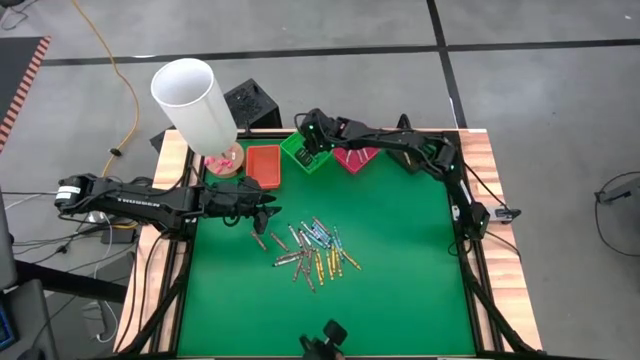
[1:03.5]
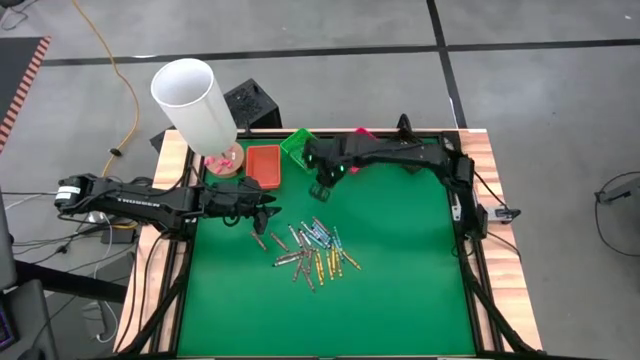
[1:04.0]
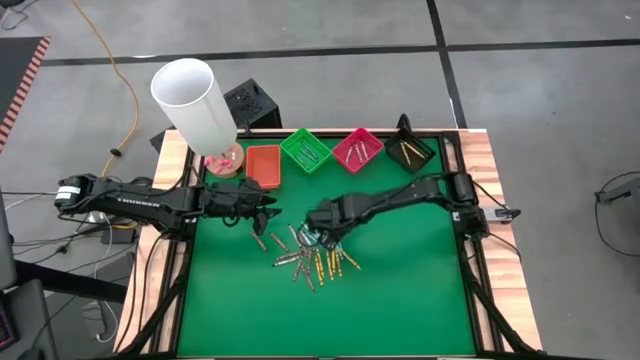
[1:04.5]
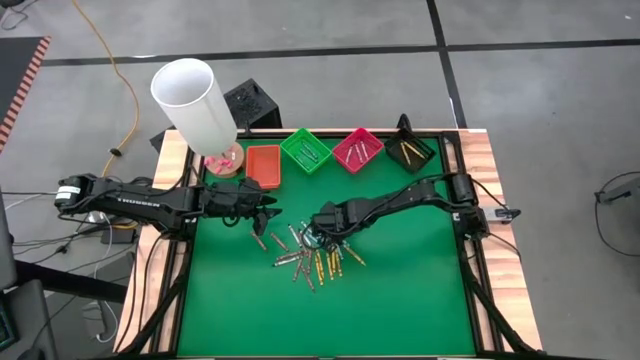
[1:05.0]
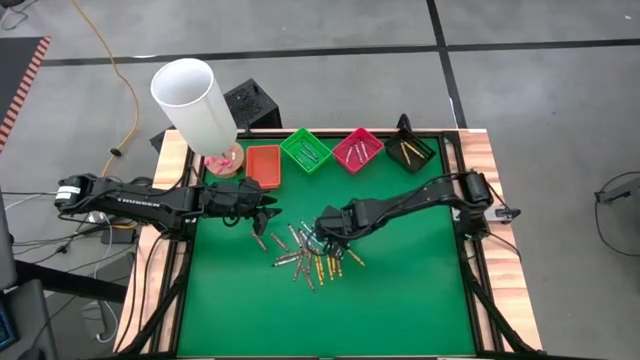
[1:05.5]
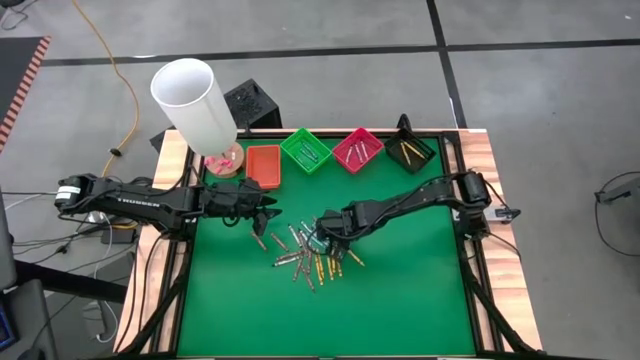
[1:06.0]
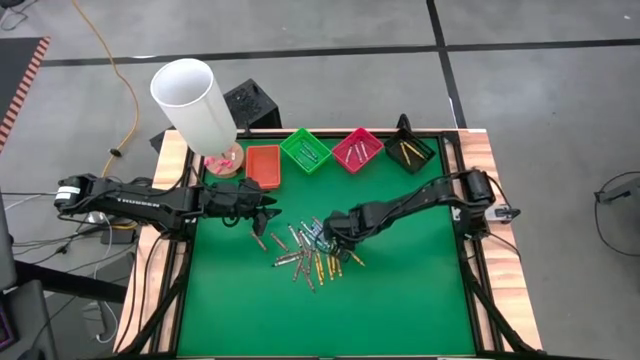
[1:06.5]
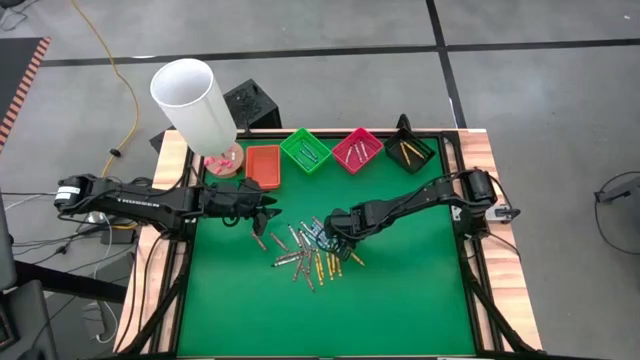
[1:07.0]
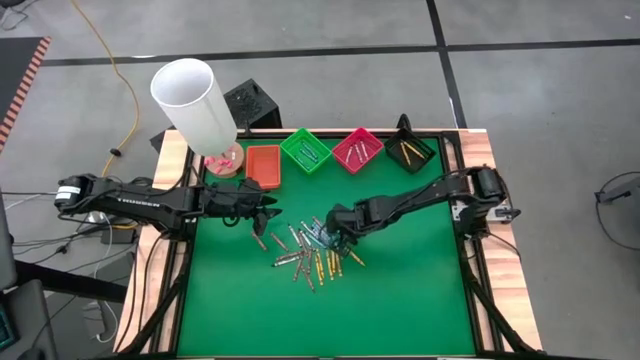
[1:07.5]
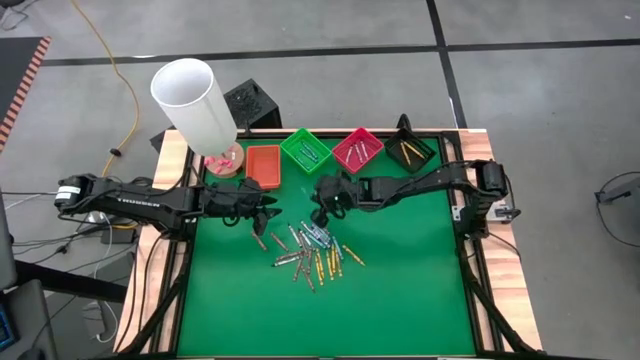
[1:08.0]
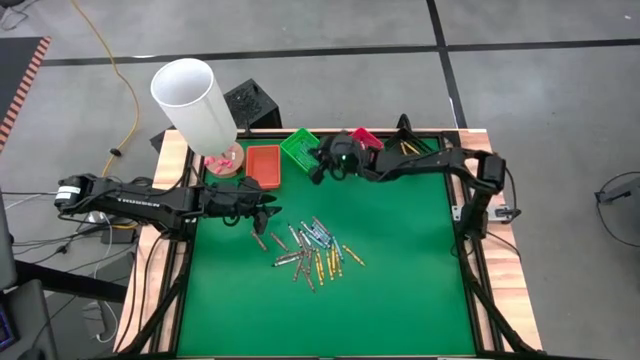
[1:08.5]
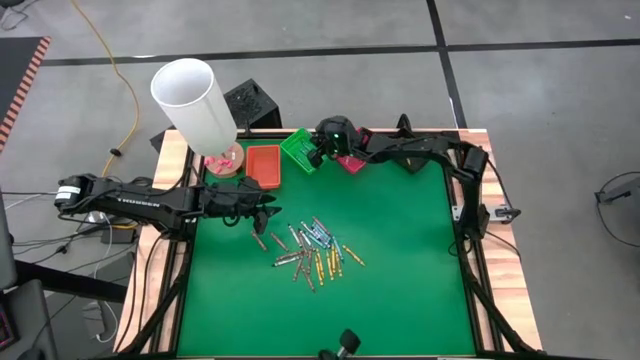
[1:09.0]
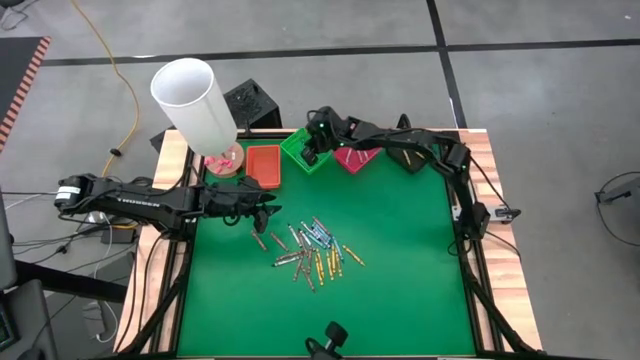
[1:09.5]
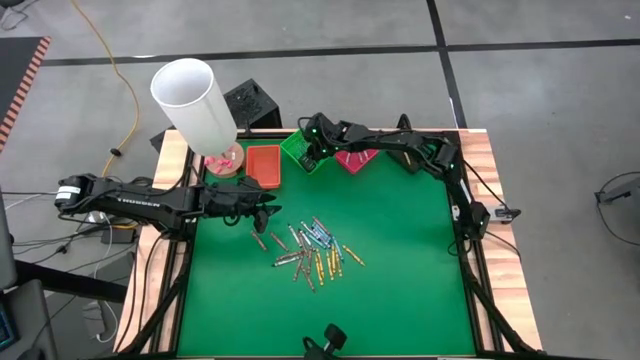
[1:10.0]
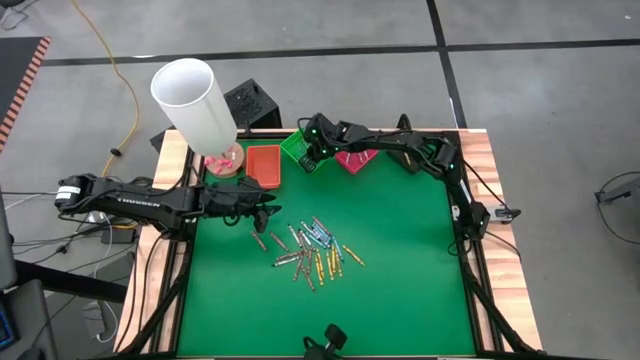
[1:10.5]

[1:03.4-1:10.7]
Task: Sort crayons
Put the blue/green crayon into the green bin

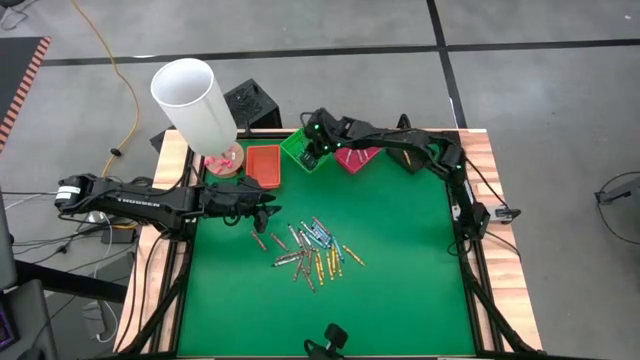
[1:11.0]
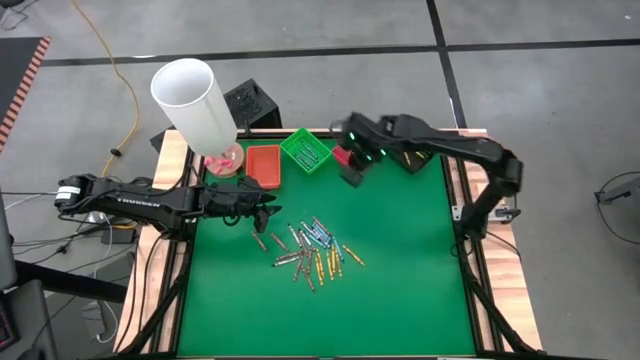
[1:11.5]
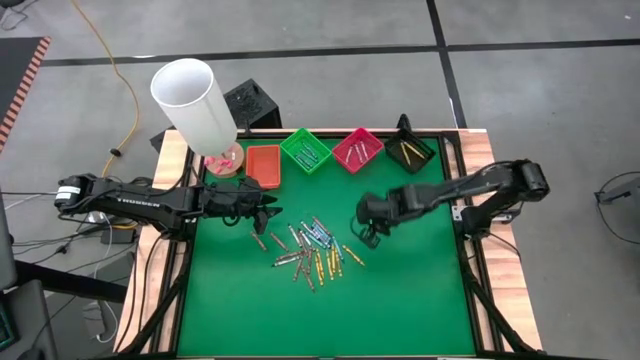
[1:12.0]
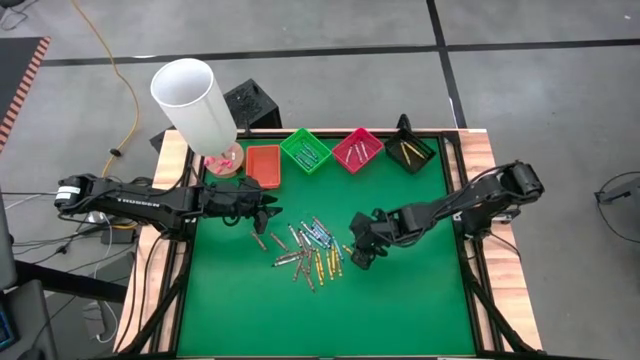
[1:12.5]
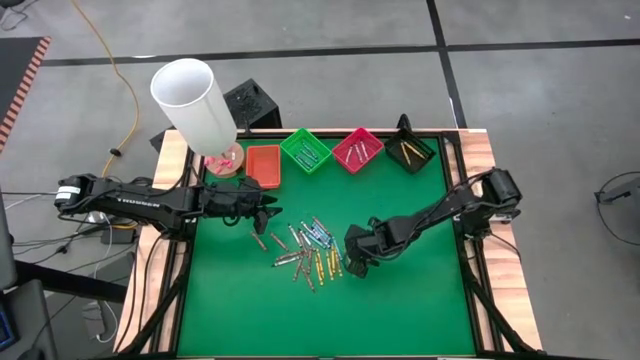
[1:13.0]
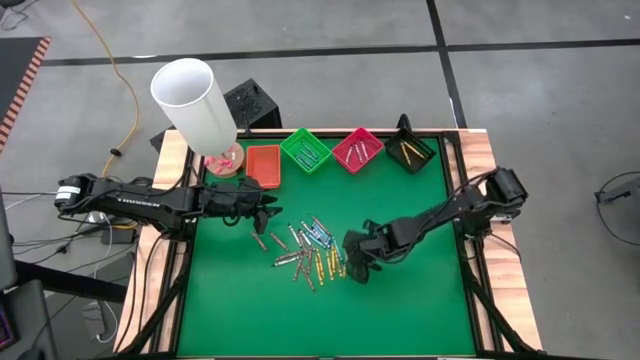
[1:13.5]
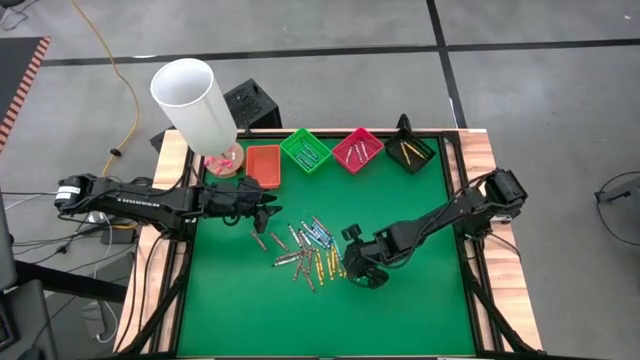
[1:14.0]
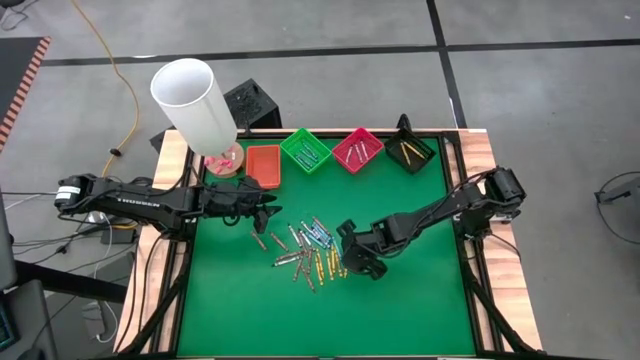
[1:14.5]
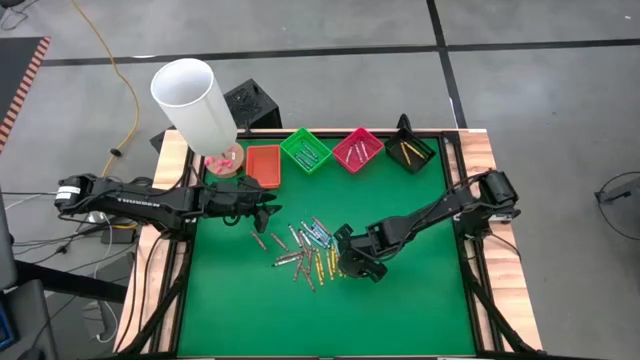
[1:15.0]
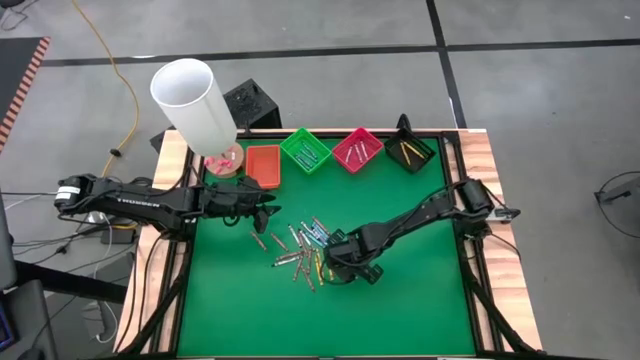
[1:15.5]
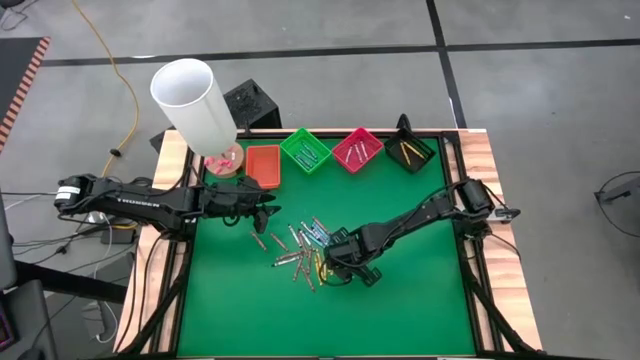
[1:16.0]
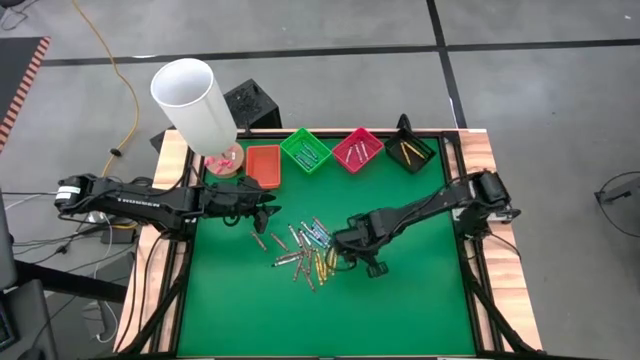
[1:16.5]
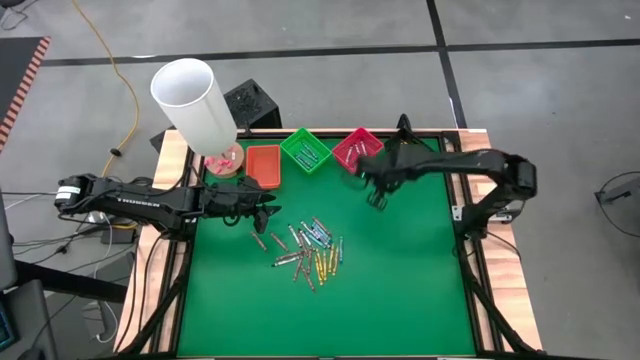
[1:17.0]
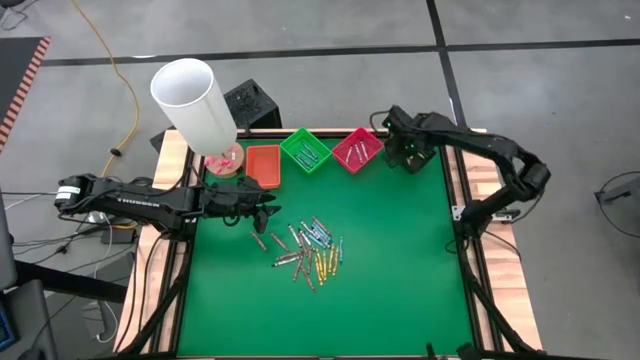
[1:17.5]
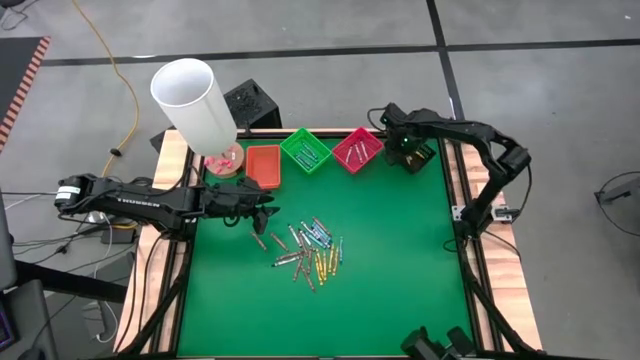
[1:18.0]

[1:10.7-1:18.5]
Put the yellow/green crayon into the black bin

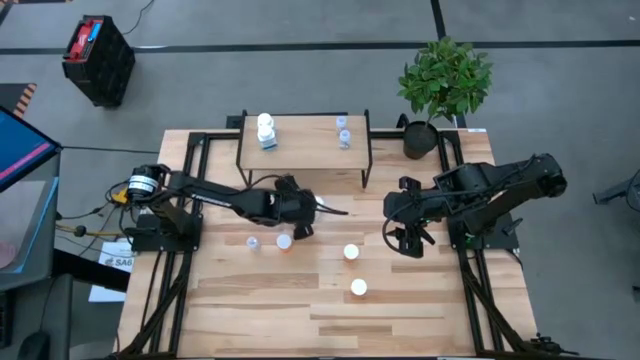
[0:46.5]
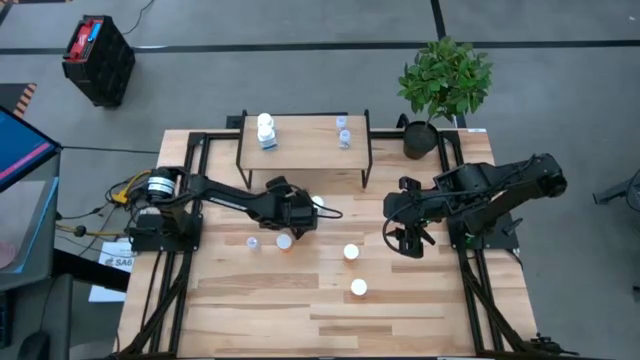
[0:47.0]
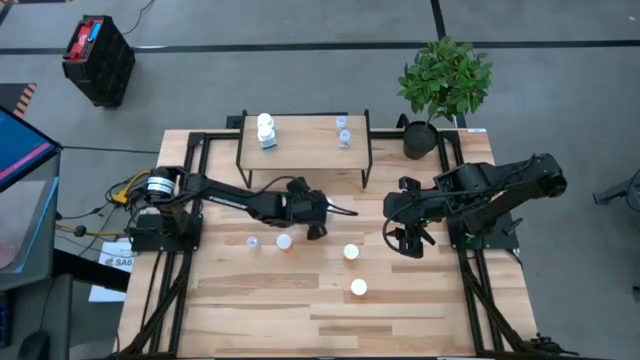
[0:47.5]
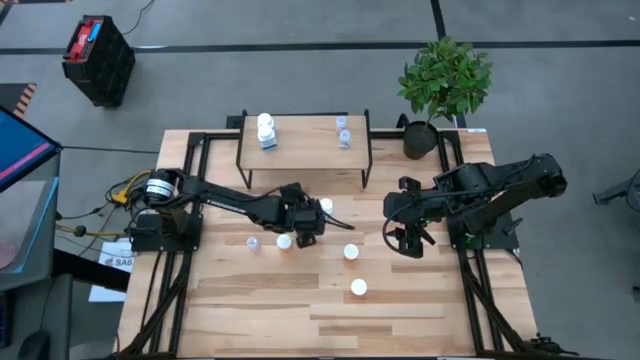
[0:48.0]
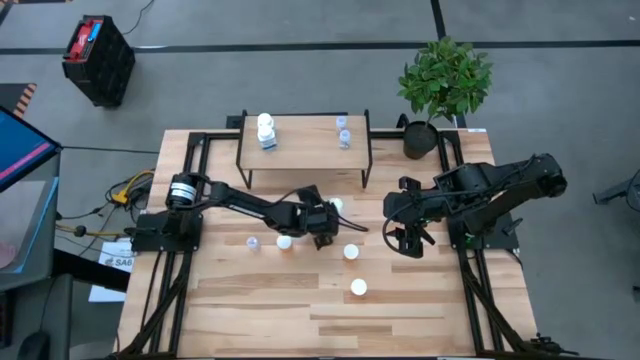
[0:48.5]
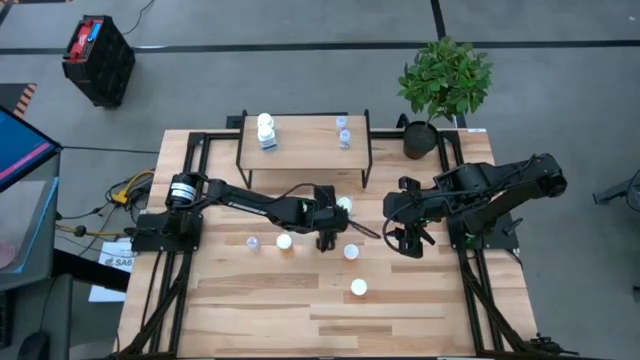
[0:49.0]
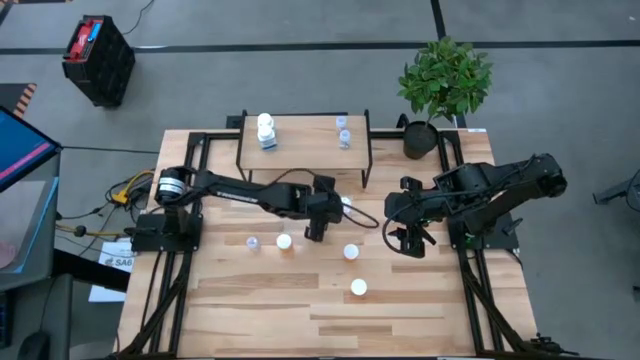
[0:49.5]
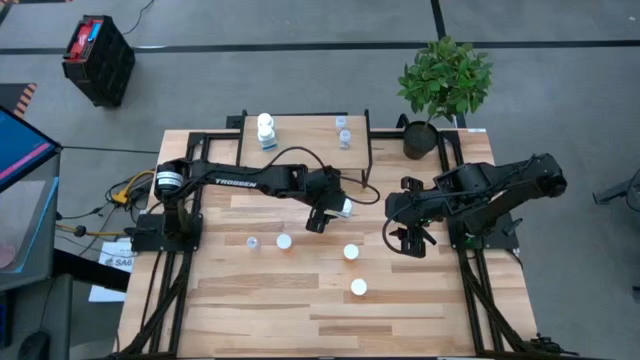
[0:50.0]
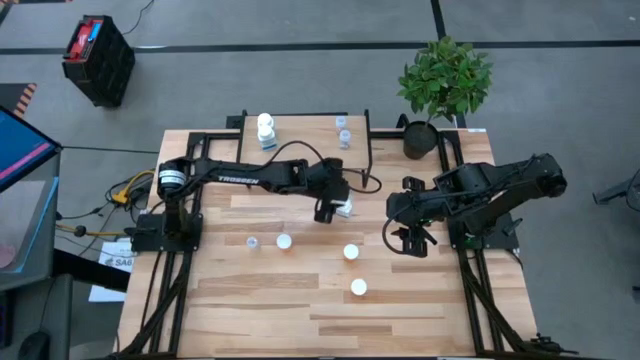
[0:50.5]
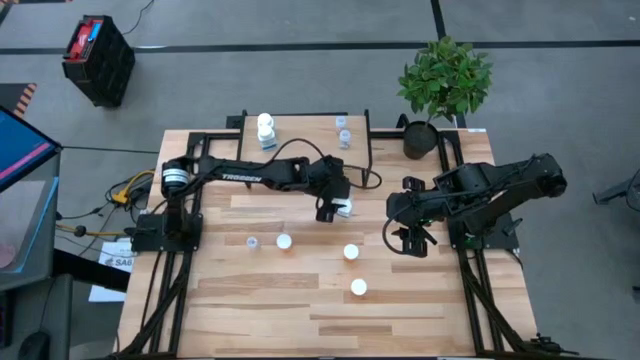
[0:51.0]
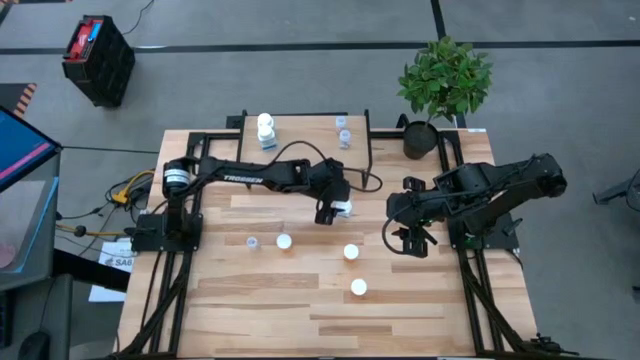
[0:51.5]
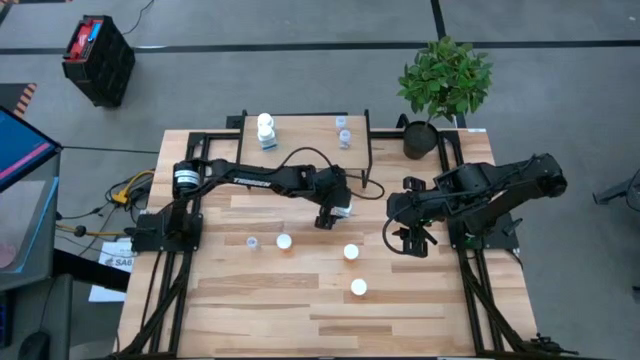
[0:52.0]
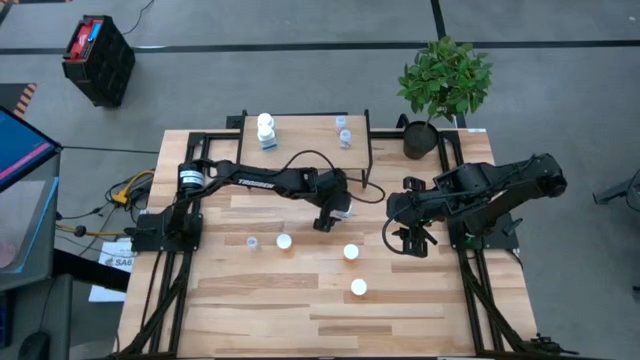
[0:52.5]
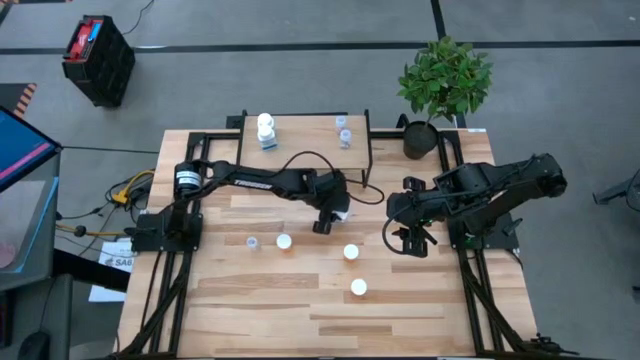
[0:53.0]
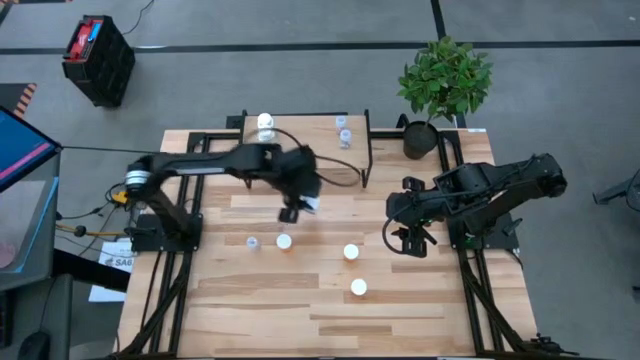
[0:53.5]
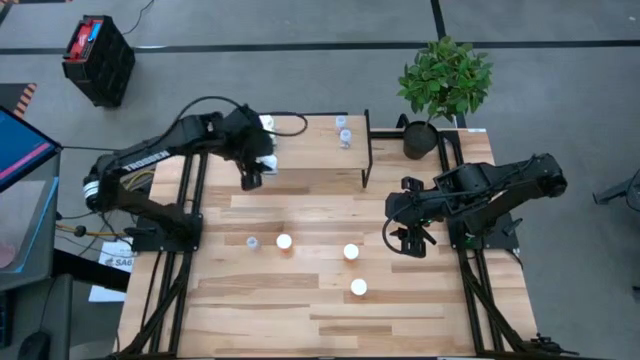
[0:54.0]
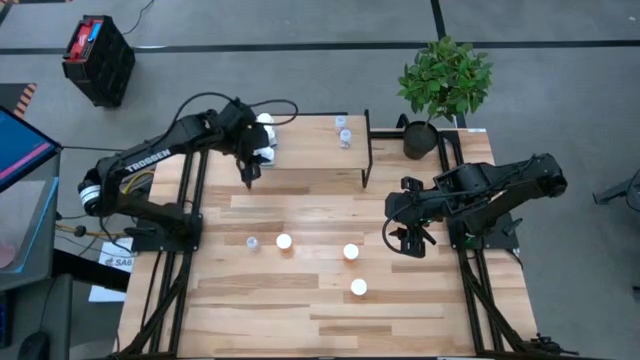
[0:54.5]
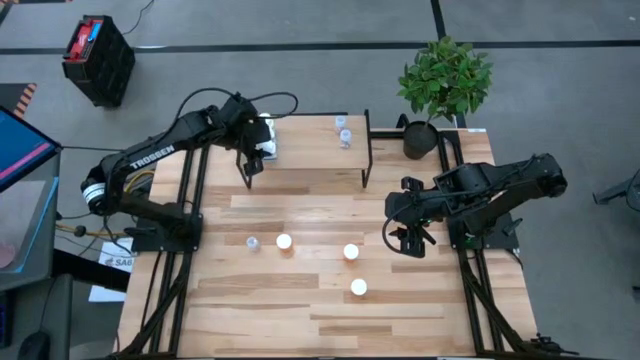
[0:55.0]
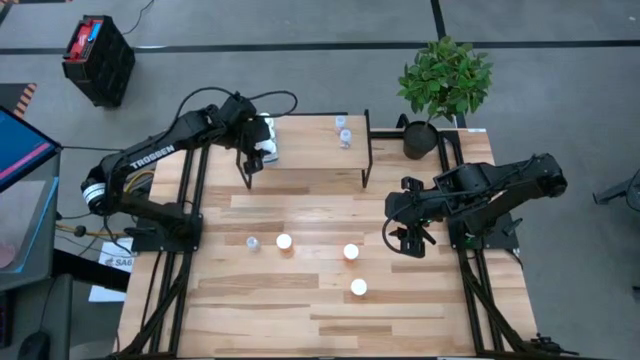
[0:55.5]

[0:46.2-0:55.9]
Task: Pick and place medicine bottles onto shelf by color
Put the white pill bottle on the shelf aligned with the other white pill bottles
